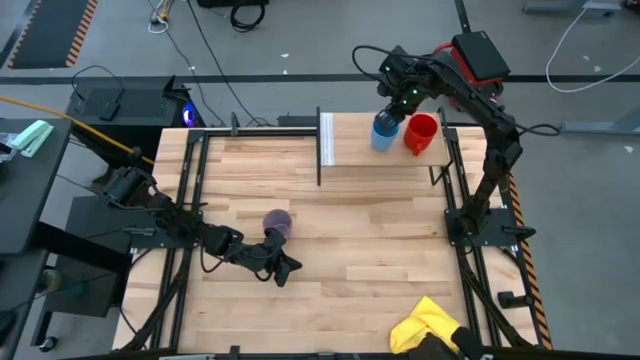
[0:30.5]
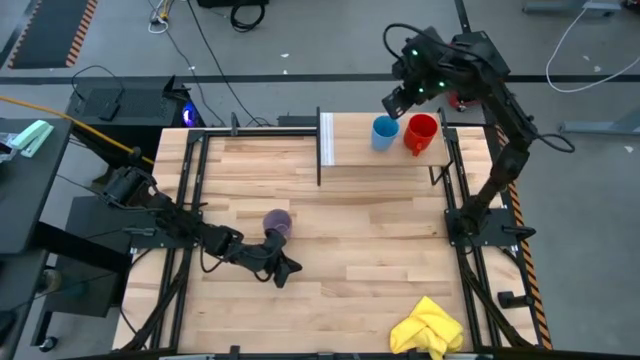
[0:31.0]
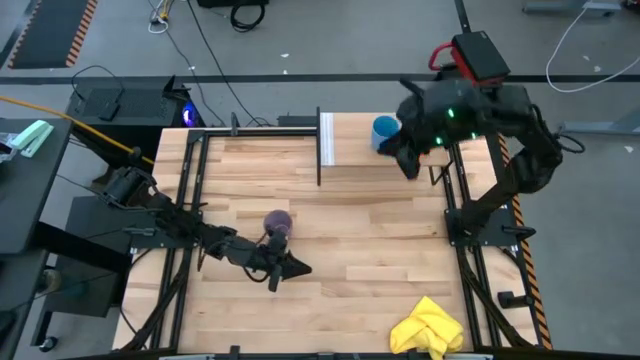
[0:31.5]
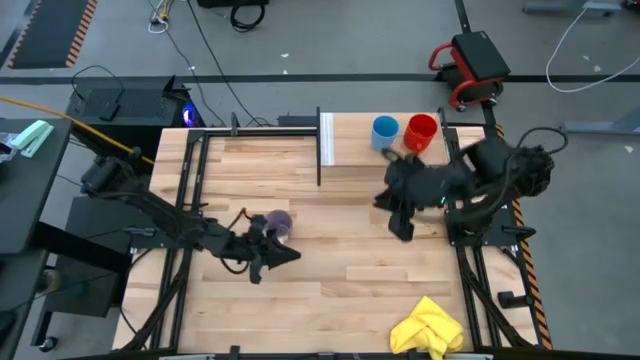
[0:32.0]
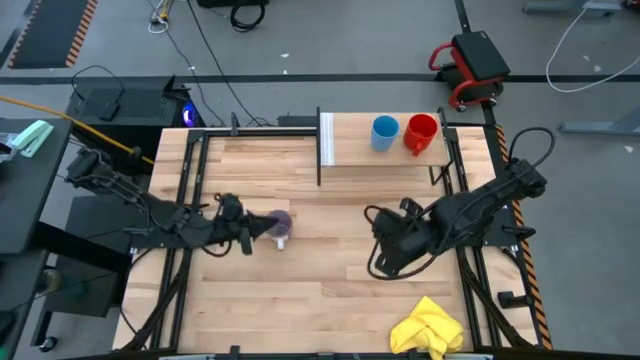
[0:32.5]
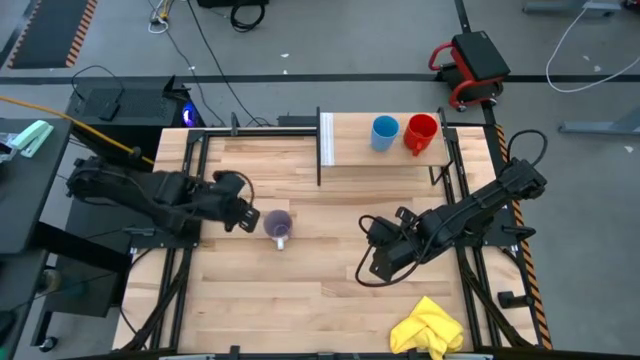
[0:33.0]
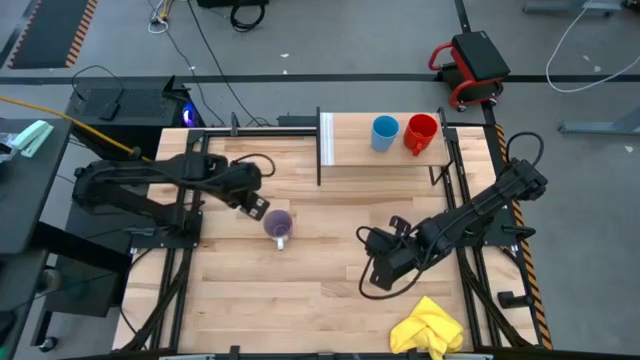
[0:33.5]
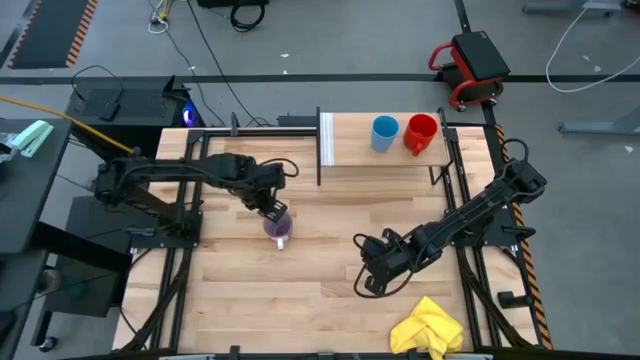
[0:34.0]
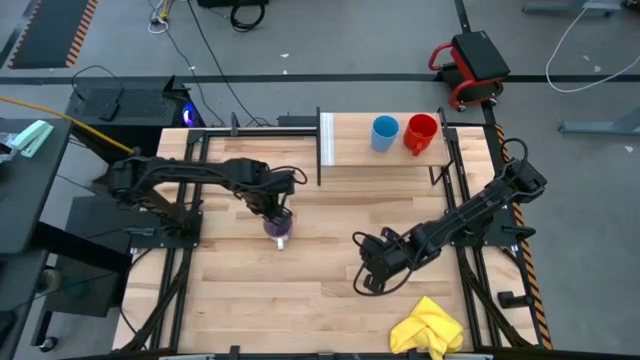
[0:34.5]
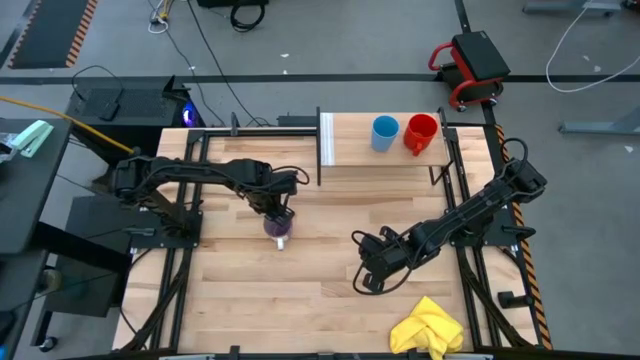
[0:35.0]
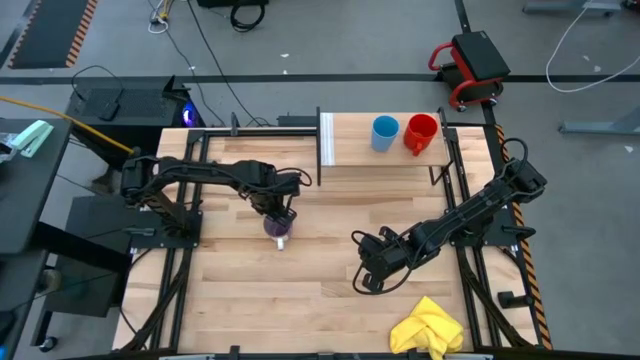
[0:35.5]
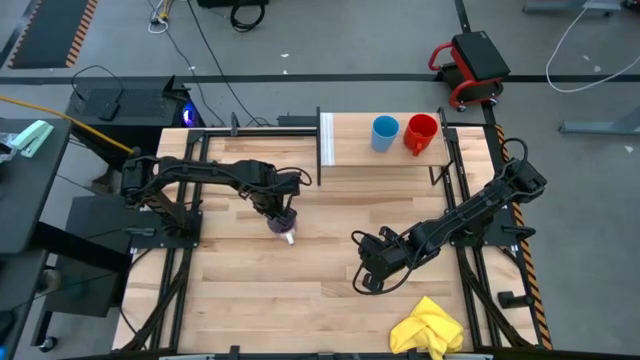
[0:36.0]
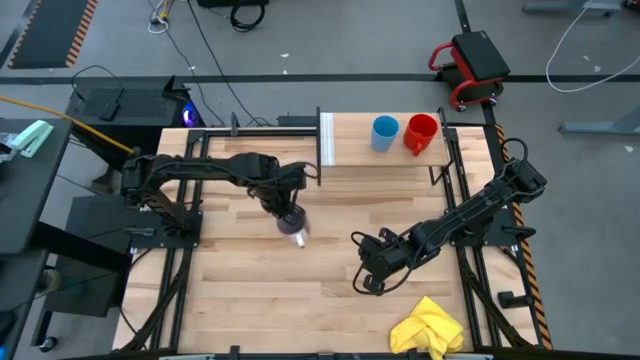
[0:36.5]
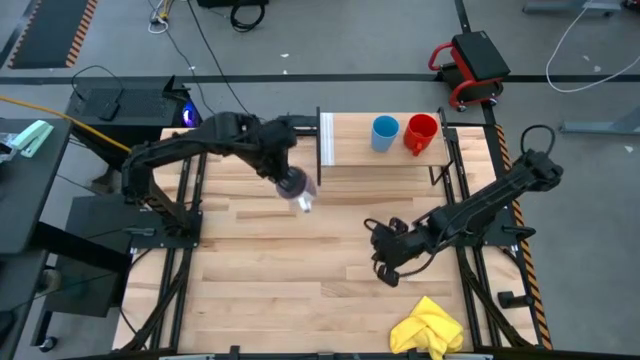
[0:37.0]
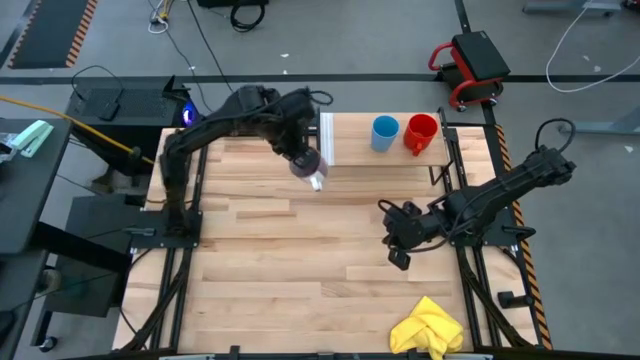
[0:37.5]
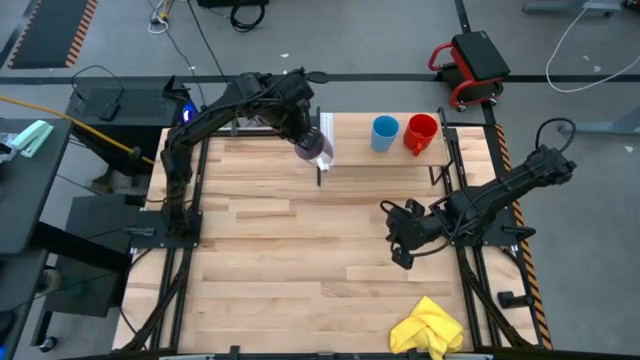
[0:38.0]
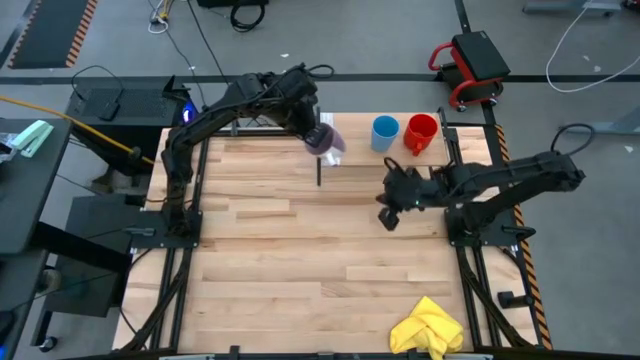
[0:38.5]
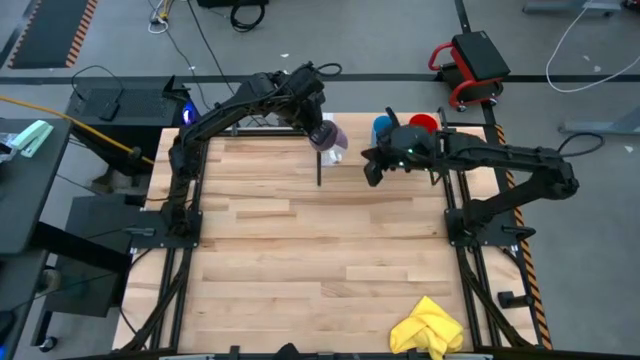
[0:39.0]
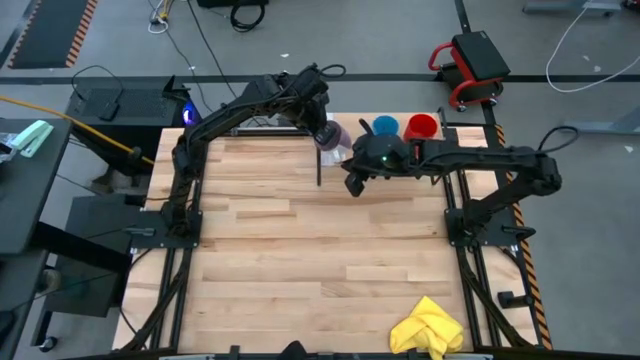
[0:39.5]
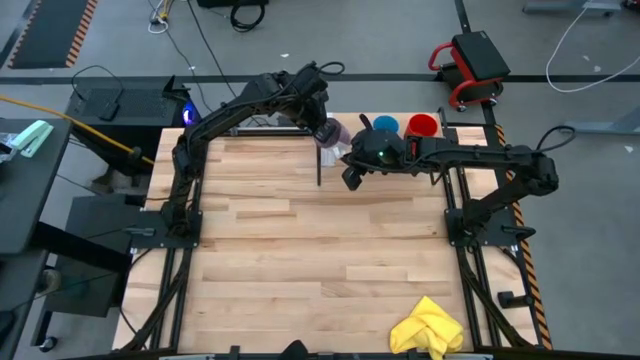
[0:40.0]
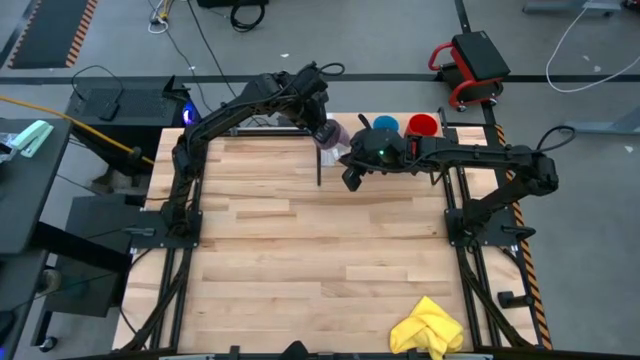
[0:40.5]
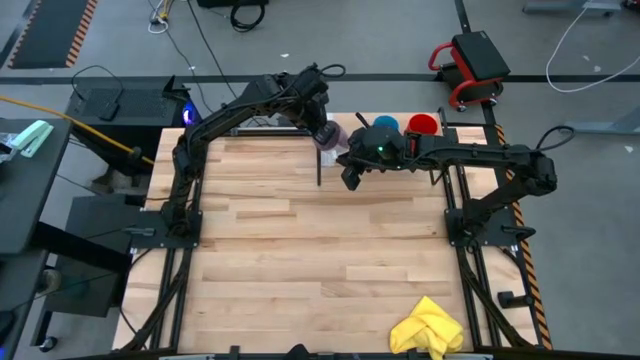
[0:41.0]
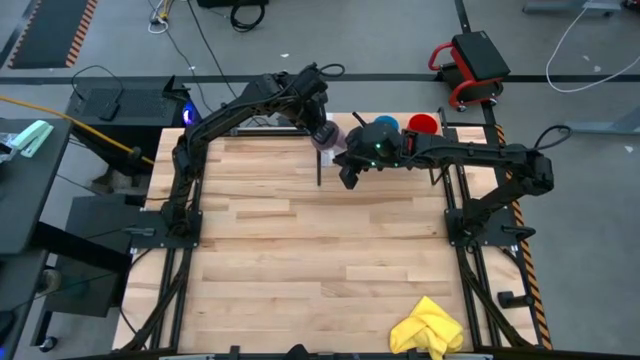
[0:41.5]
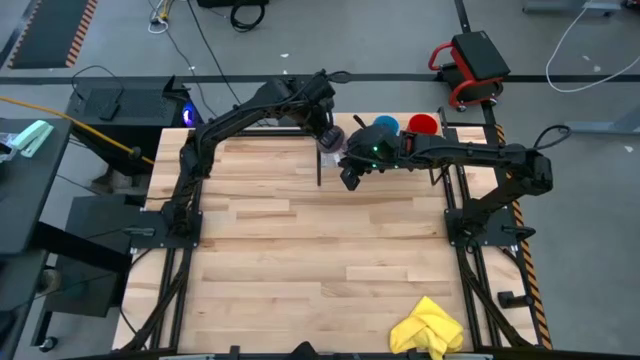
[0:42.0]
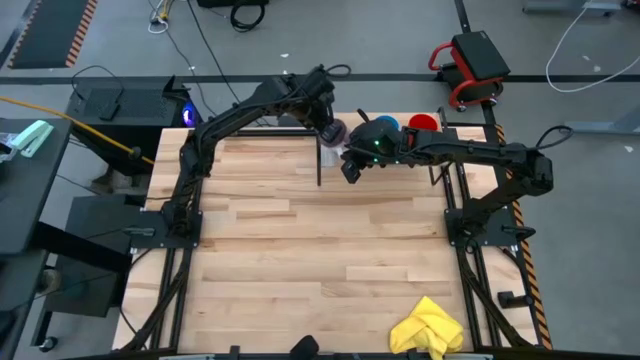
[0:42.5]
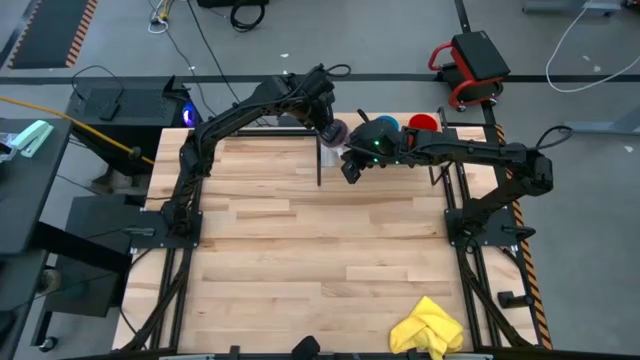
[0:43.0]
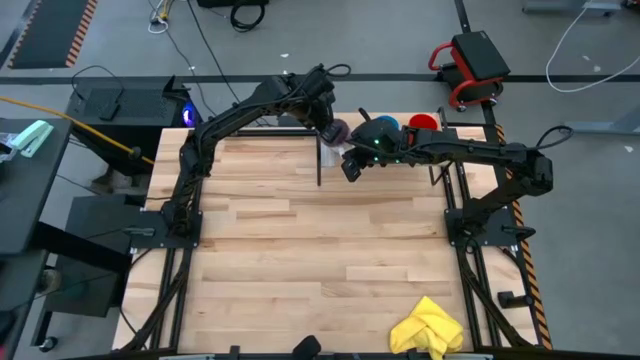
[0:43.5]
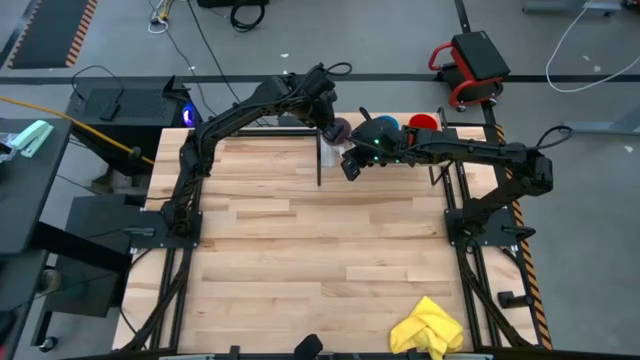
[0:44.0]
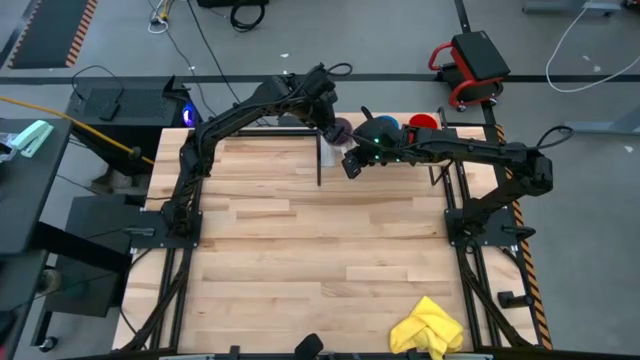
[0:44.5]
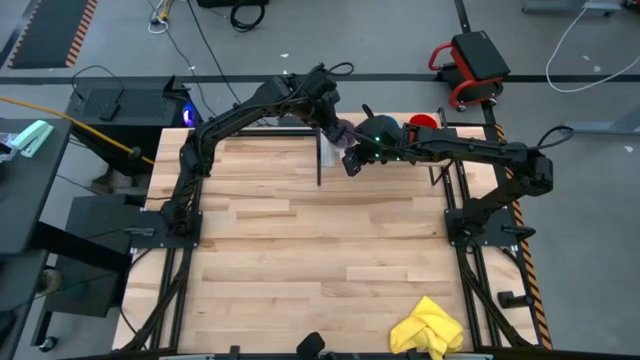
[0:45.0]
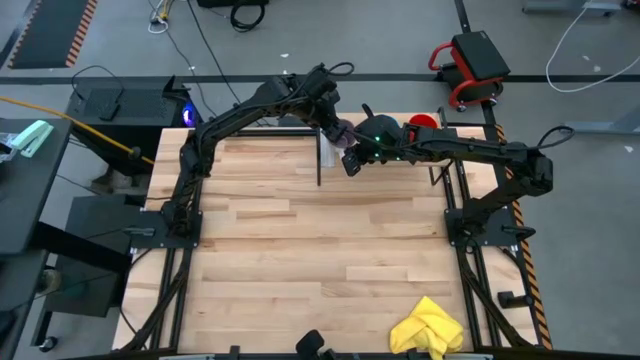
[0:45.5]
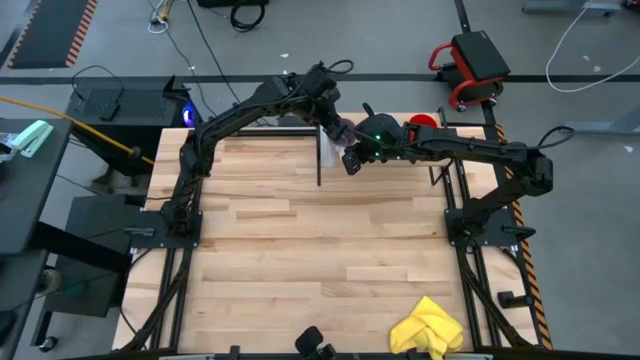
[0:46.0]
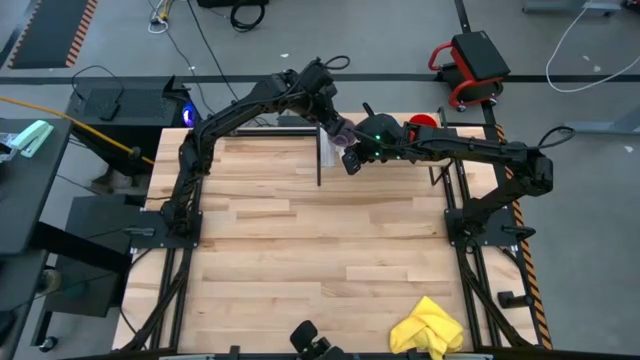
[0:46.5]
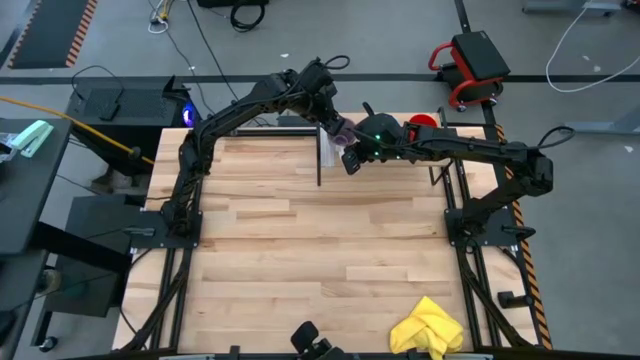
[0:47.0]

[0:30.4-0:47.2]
Task: Stack small to large cups/mugs on shelf
Put the purple mug on the shelf

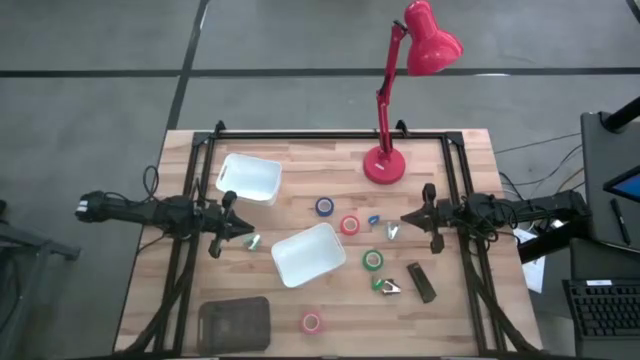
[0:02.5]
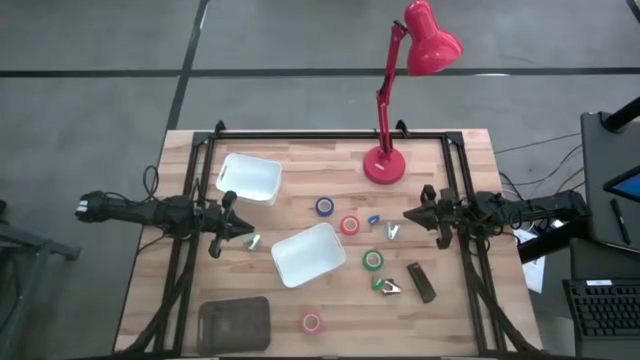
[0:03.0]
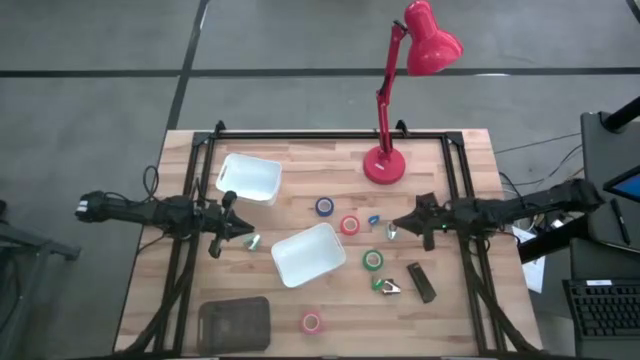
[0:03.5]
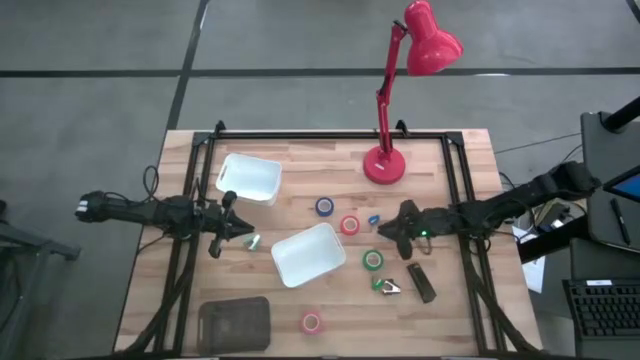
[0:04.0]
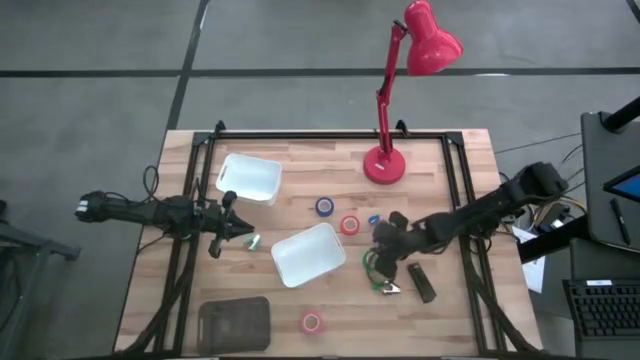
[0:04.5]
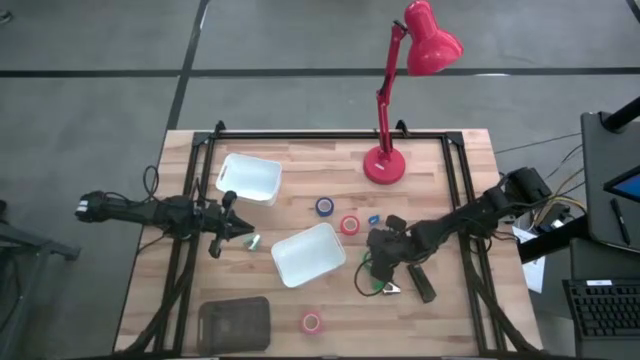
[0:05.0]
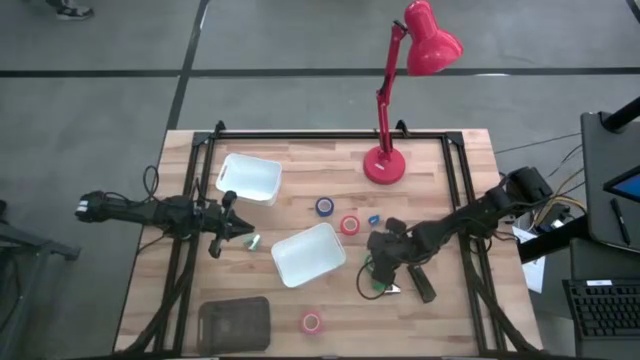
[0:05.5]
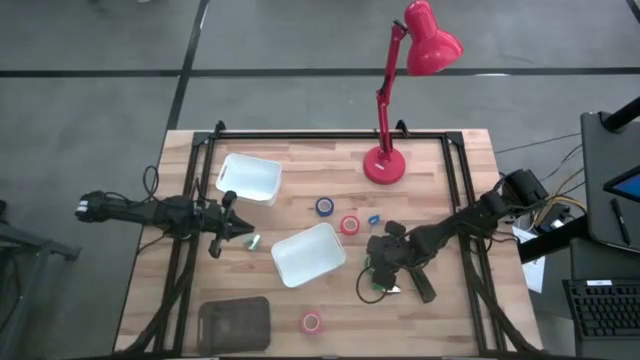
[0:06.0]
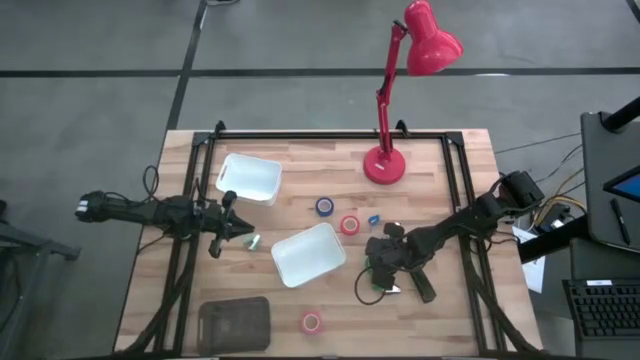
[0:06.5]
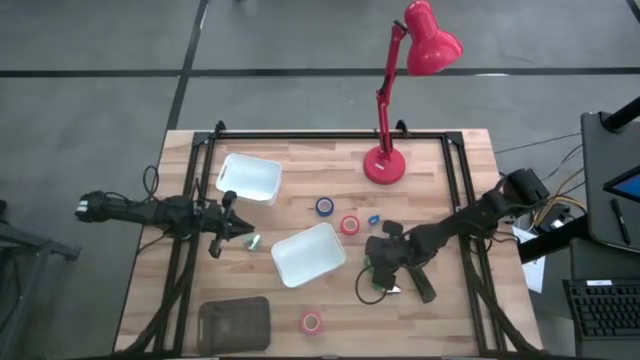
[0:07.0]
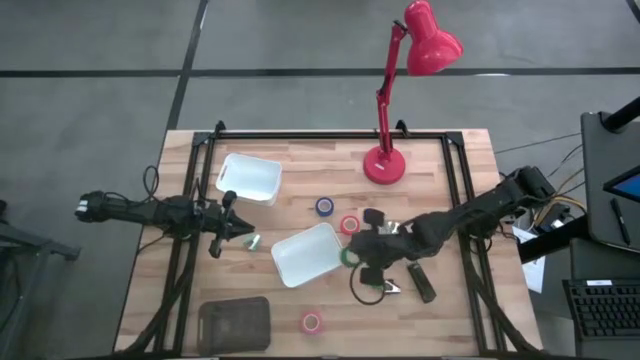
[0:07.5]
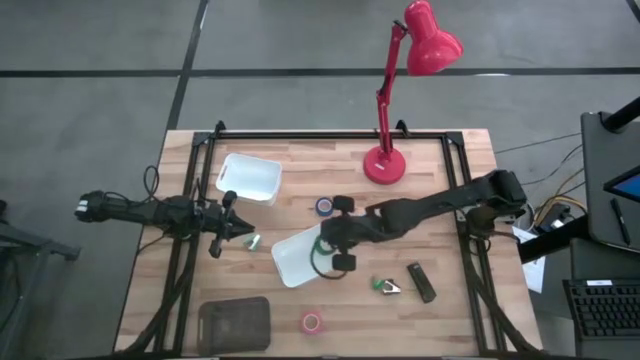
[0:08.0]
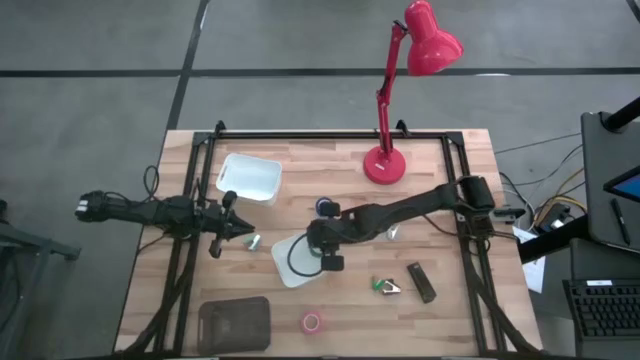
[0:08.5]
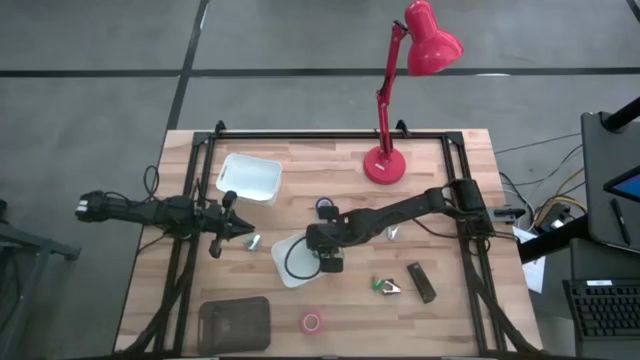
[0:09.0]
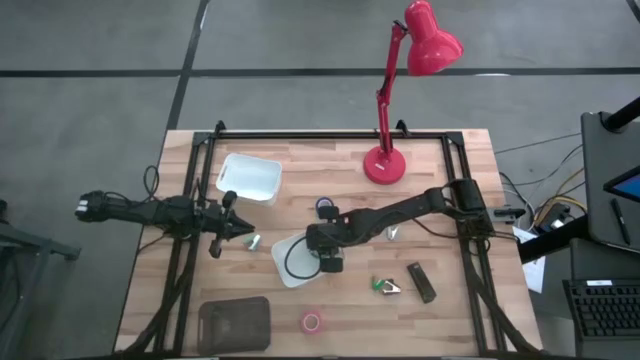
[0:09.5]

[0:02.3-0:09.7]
Task: Pick and place Stapler, Stapler remover, tape
Put the green tape into the bottom white bin
